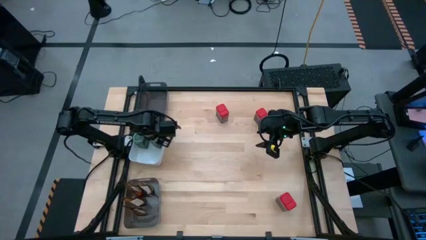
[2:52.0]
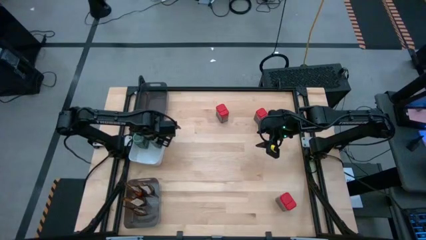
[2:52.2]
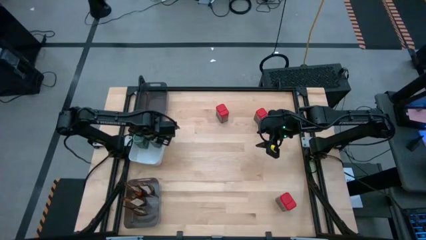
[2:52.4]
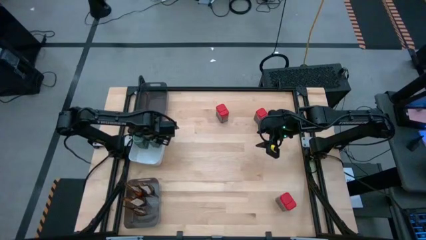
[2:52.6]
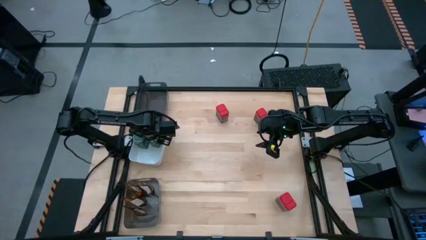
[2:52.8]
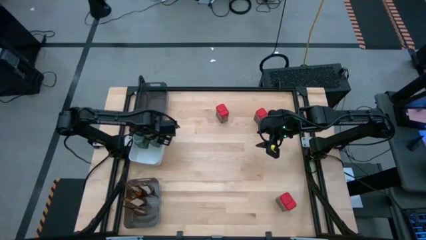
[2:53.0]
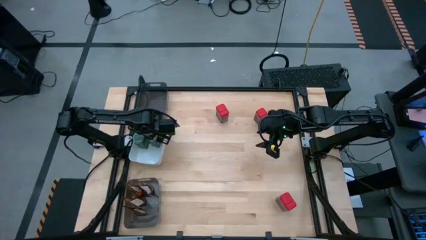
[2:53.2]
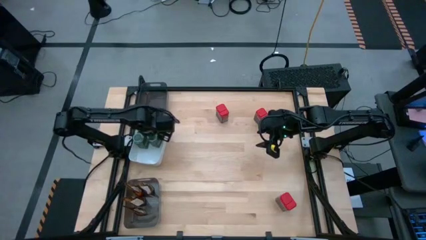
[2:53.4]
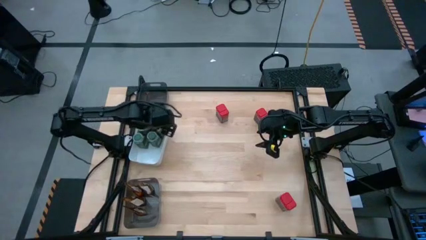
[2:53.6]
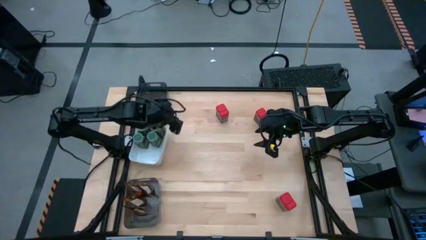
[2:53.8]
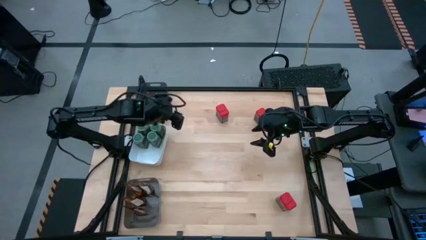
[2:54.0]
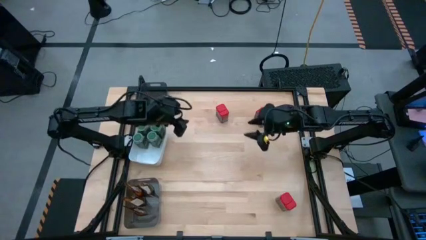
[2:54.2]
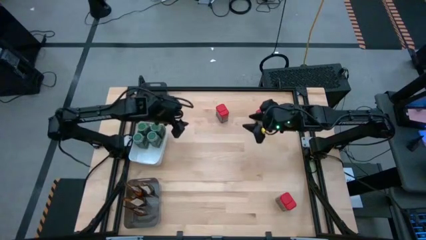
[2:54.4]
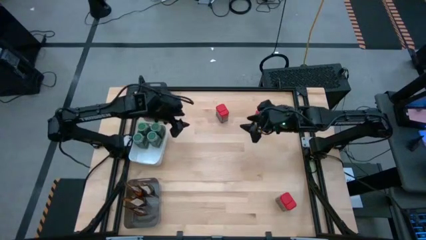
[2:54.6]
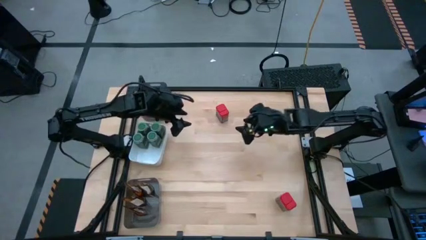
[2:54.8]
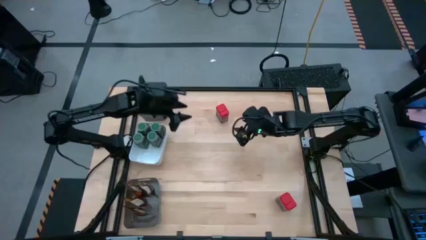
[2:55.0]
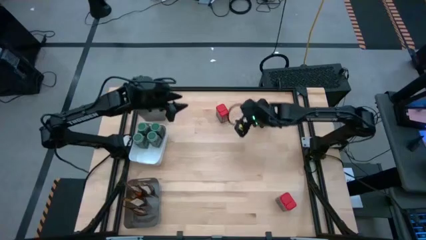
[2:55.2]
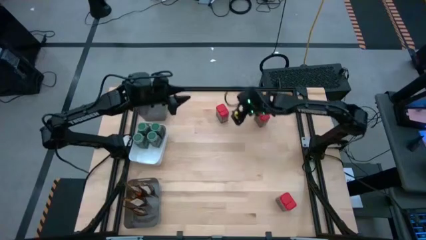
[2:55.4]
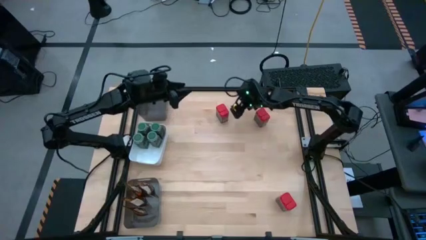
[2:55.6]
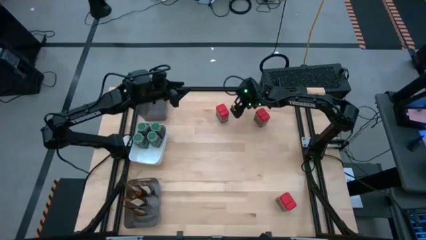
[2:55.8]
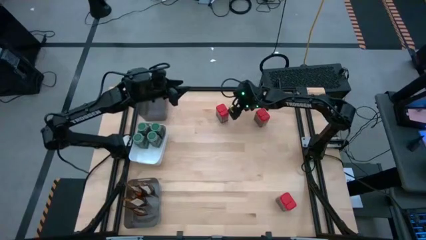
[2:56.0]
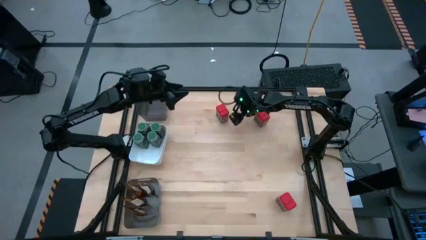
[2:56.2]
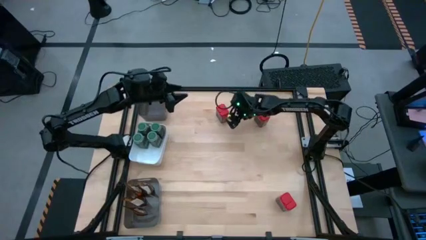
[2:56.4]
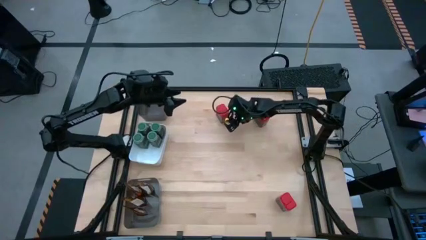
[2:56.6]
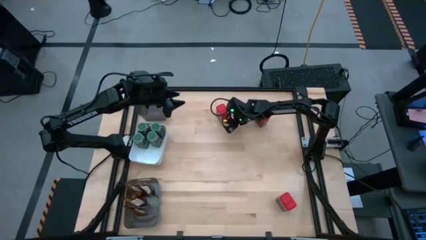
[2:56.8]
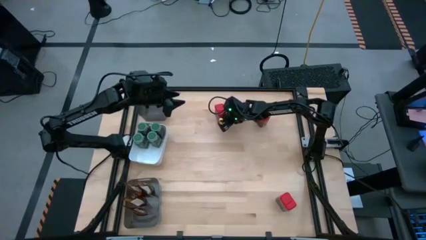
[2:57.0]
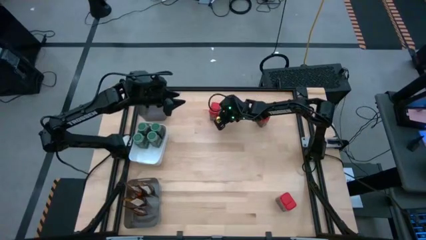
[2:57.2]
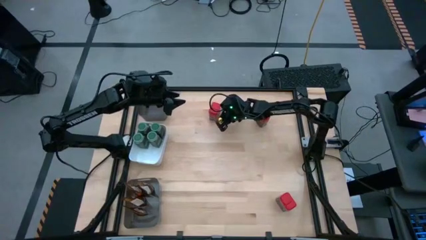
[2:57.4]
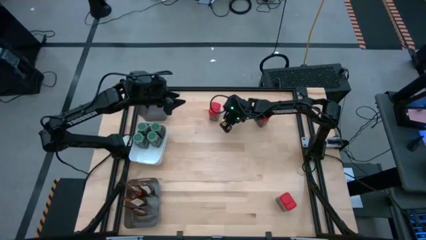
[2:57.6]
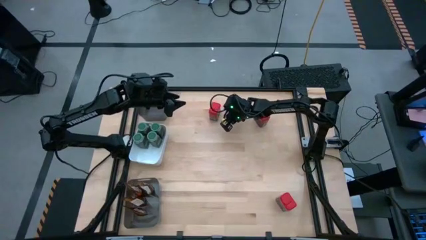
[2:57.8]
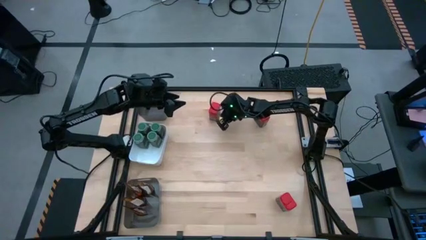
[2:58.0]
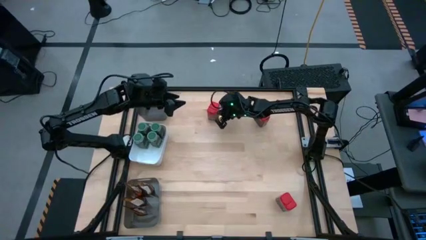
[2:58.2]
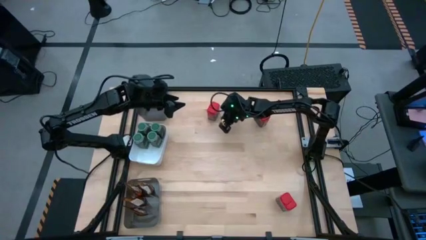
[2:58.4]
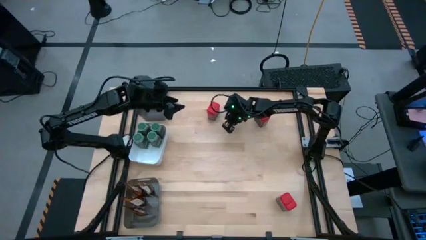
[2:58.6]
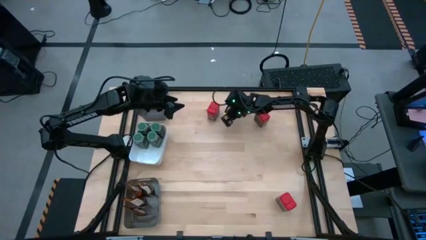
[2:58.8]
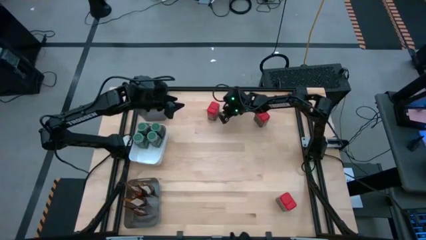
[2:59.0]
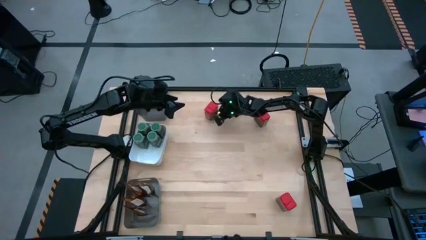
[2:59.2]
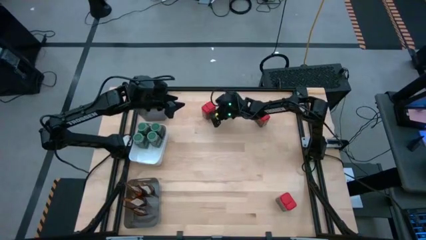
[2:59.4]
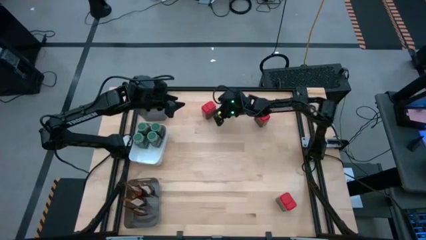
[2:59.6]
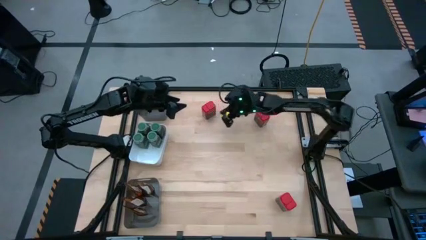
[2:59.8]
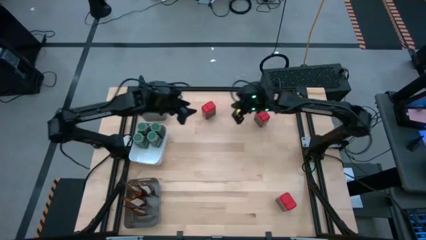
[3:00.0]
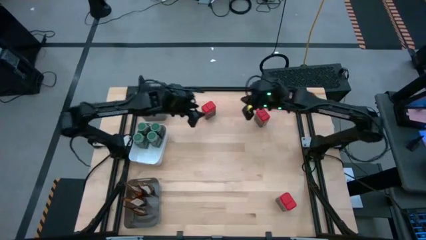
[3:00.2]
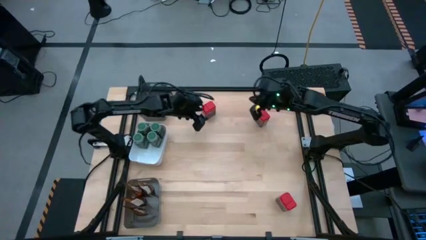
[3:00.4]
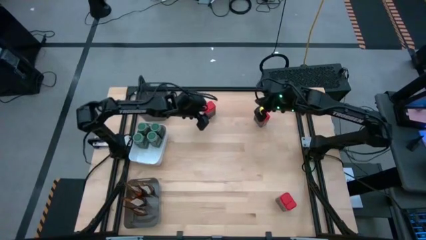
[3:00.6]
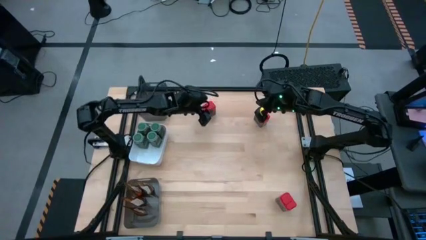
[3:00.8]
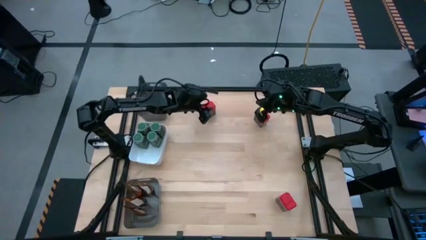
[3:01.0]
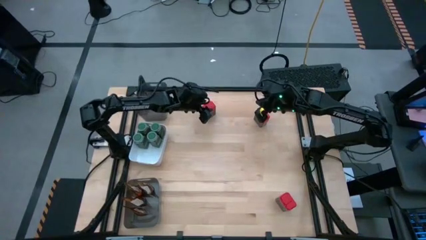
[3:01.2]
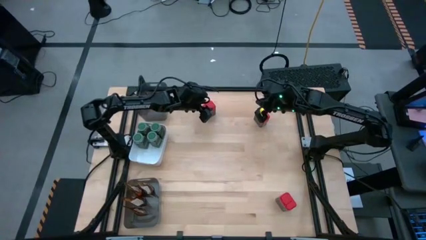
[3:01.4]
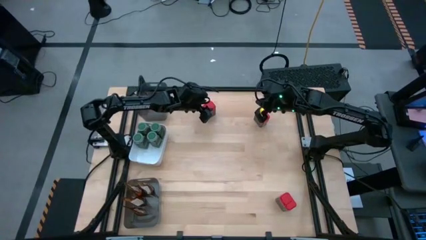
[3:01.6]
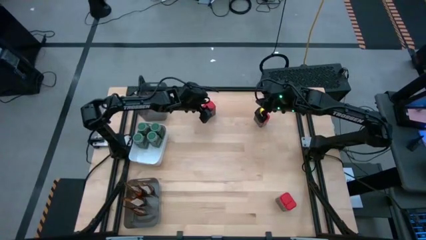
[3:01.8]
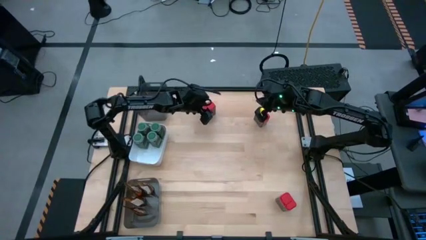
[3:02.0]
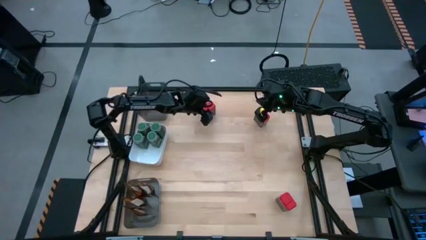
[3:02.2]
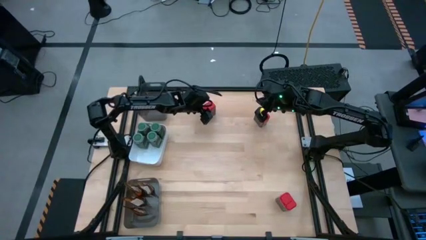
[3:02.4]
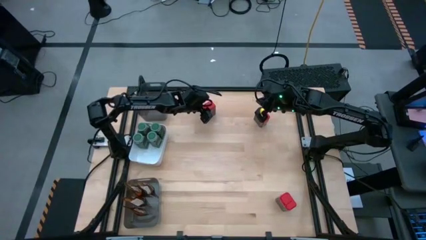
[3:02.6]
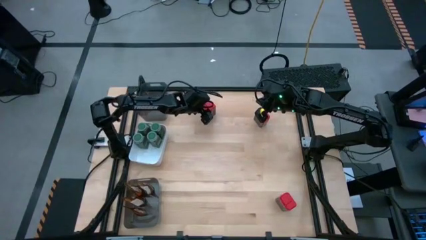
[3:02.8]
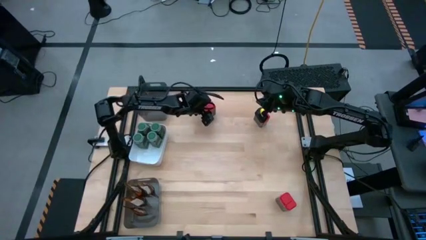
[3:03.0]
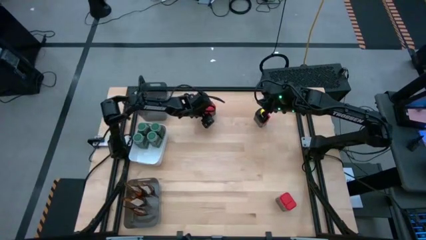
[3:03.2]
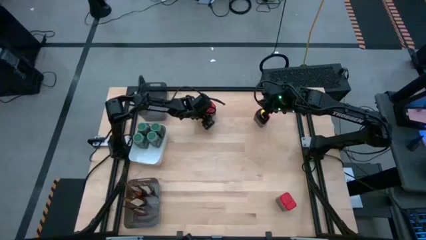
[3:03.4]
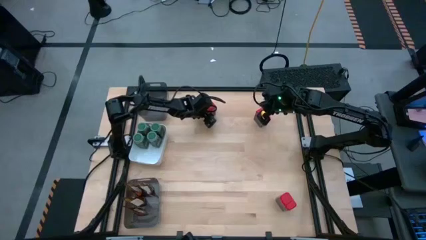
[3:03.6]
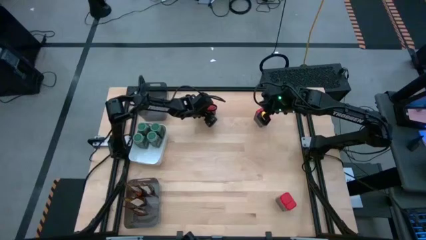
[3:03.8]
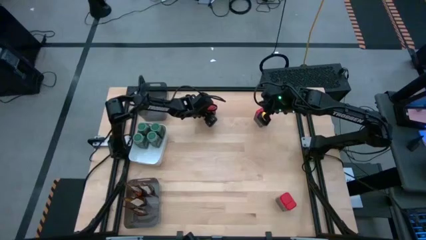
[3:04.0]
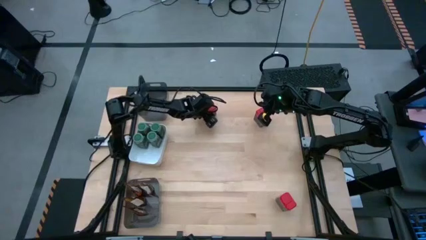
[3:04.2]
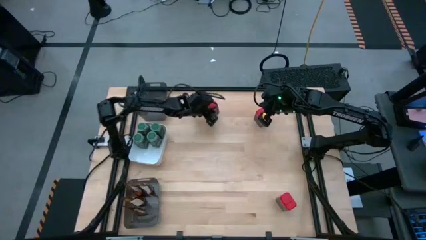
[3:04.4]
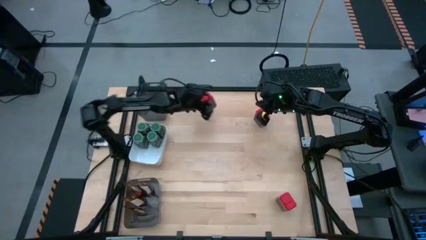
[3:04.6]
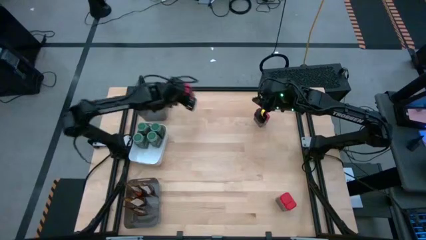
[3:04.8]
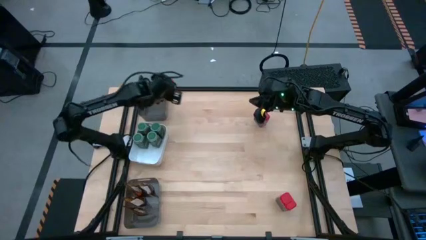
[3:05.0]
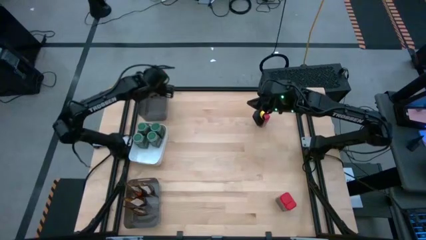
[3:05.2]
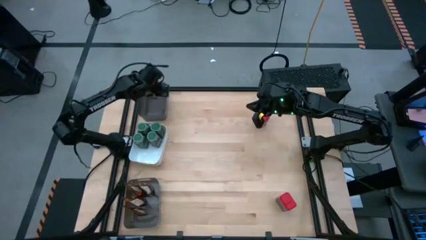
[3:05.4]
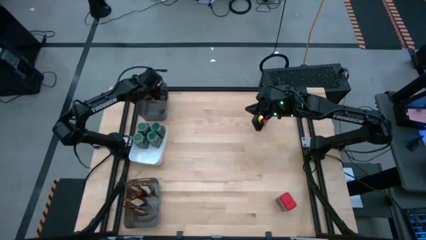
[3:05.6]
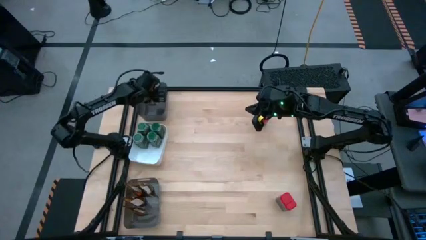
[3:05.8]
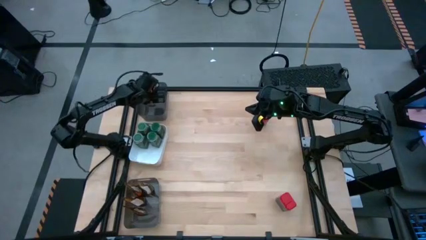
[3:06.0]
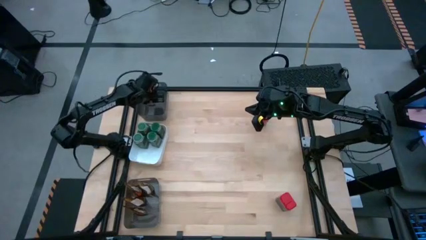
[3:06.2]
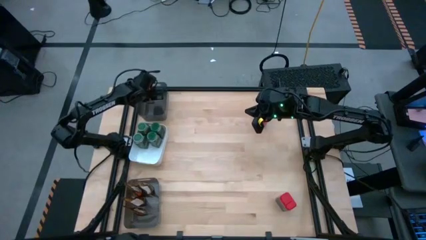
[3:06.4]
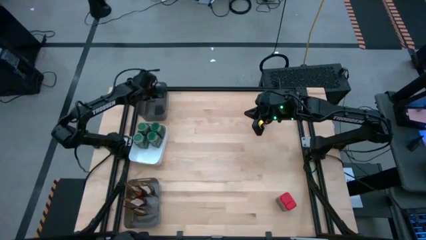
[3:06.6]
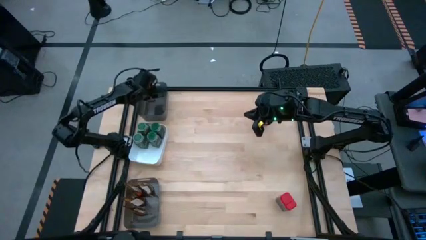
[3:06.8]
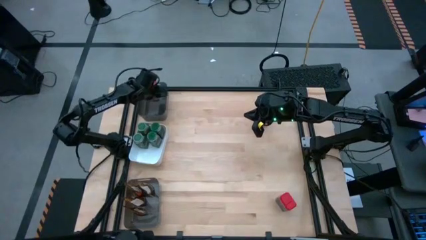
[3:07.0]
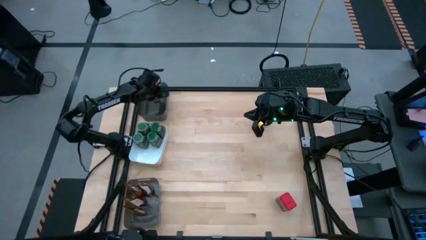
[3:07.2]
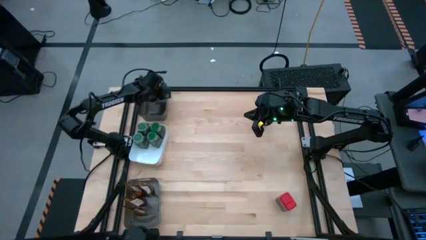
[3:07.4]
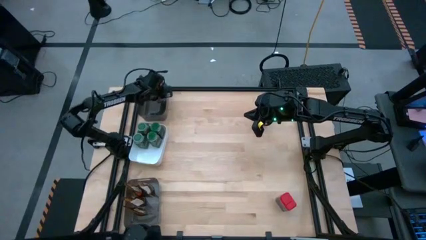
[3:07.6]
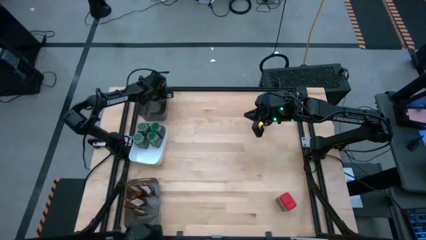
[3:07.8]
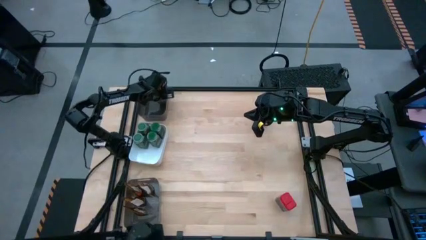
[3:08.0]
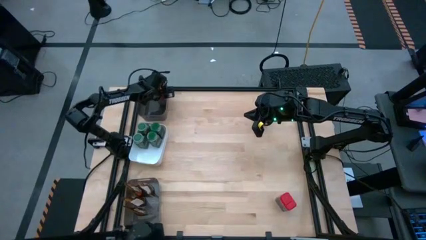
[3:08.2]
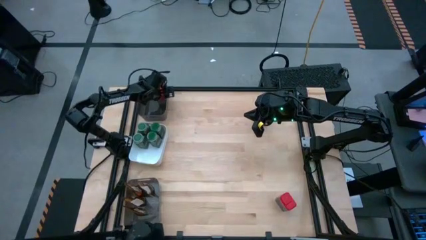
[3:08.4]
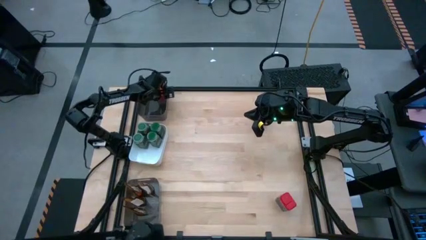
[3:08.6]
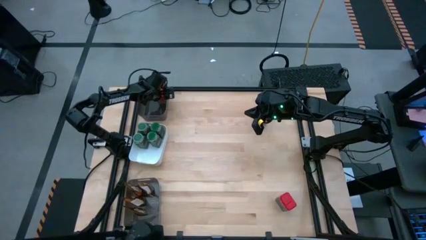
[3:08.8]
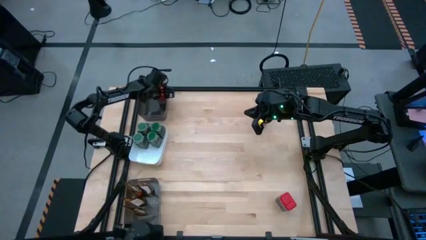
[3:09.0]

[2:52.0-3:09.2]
Task: Sort spices by type
Put the red seasoning can into the top black bin
